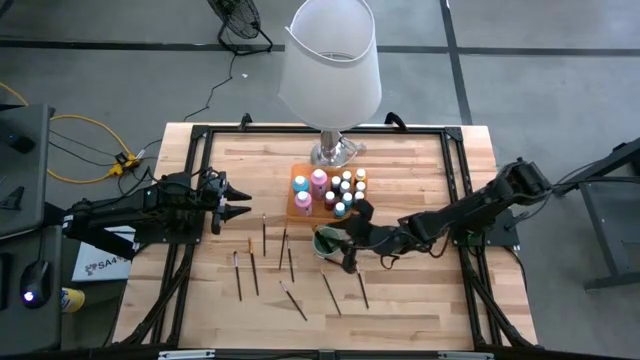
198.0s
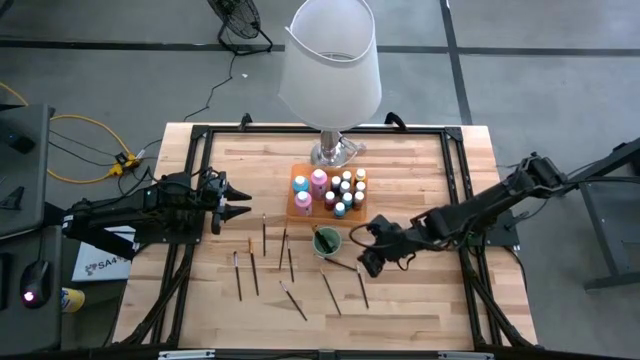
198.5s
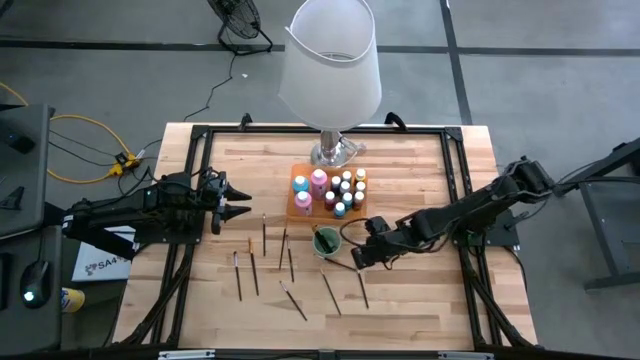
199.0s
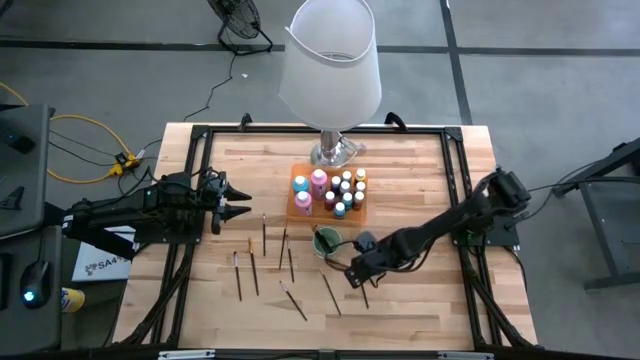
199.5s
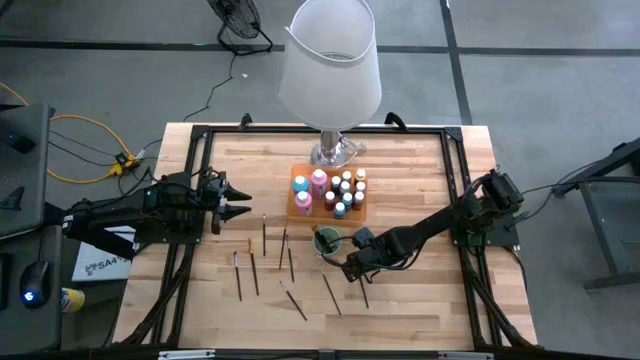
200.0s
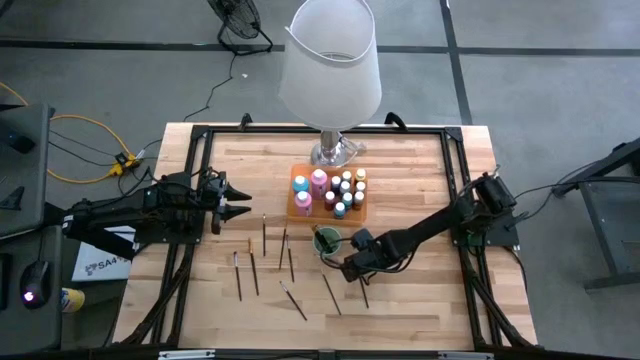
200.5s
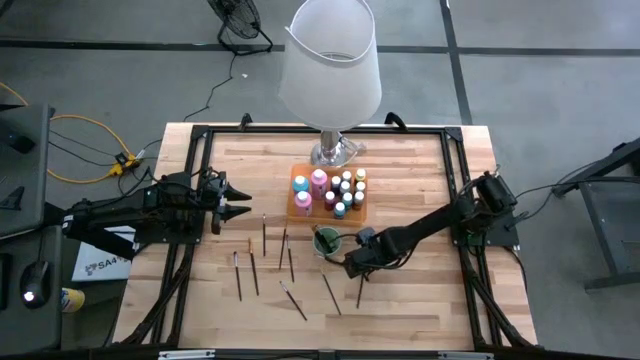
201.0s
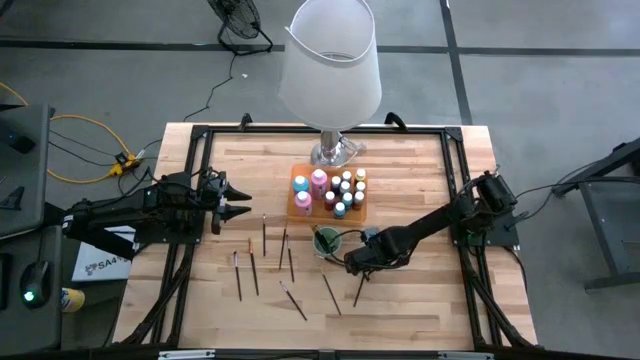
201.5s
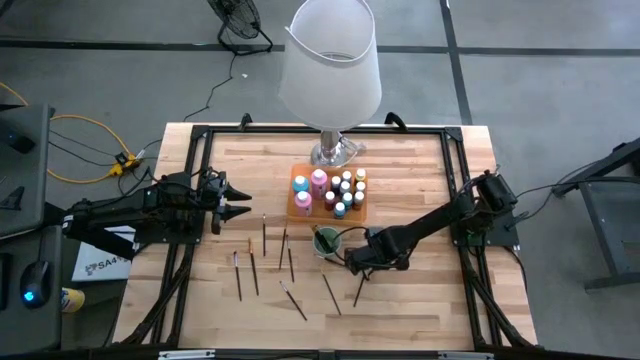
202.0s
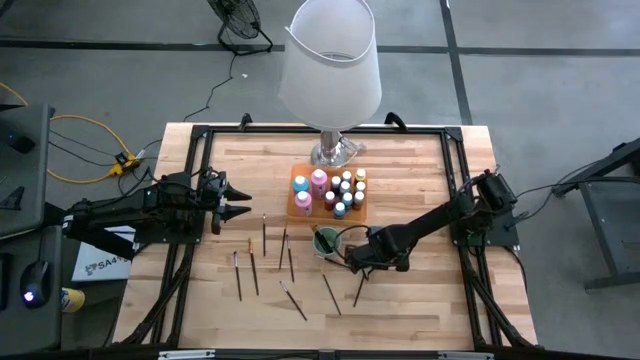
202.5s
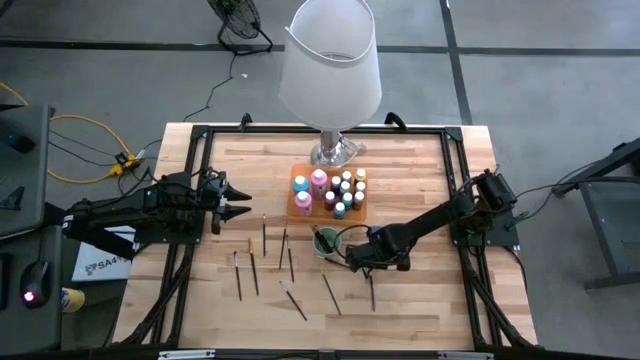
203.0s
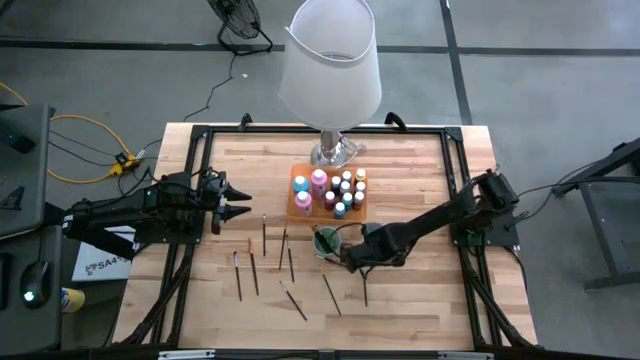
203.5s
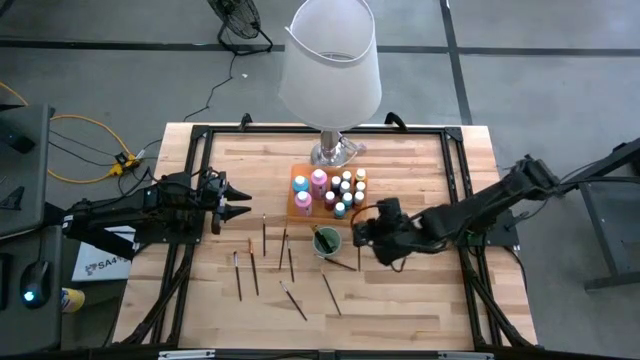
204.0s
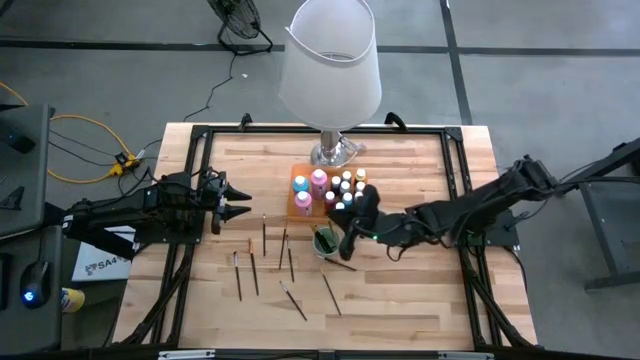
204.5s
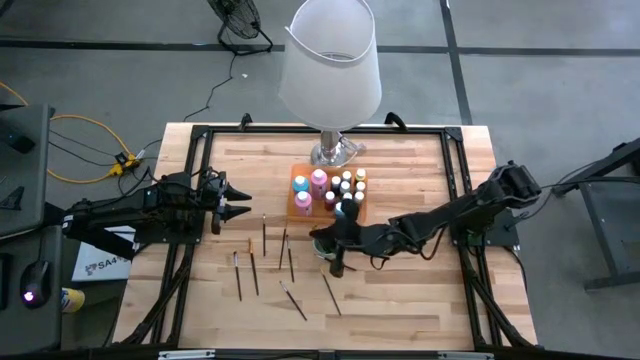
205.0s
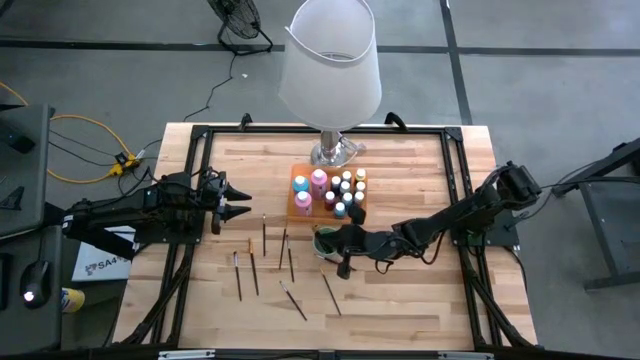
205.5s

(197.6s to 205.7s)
Task: Pick & Place Paint Supplies
Put the gray paintbrushes into the green cup

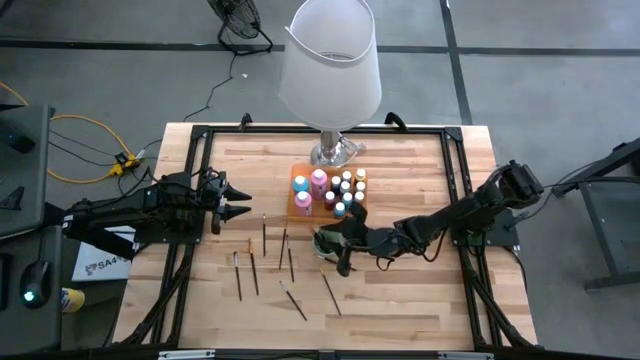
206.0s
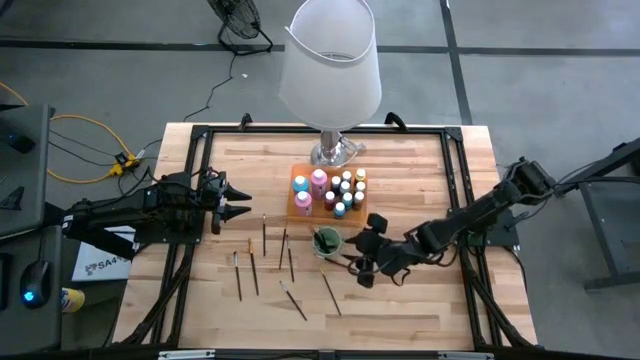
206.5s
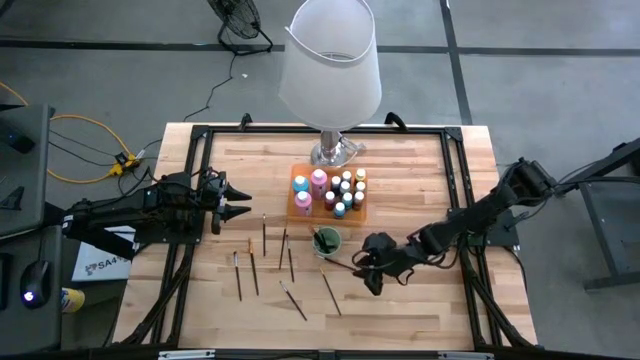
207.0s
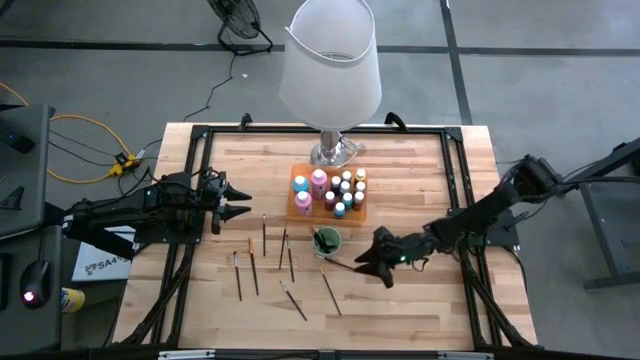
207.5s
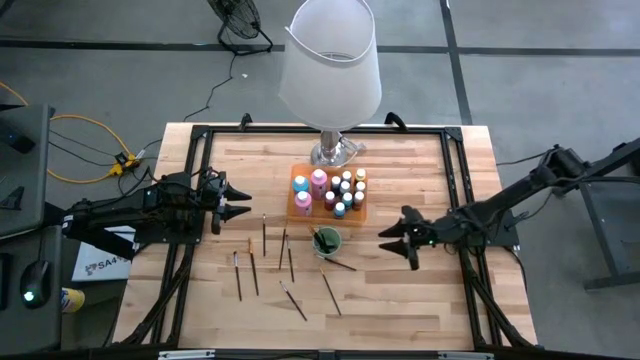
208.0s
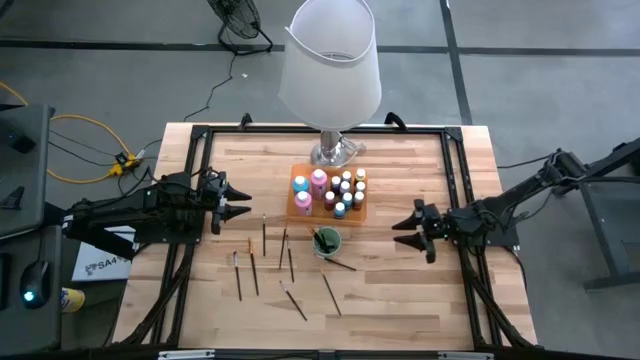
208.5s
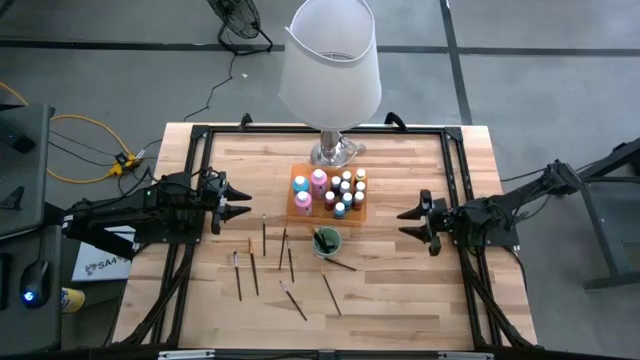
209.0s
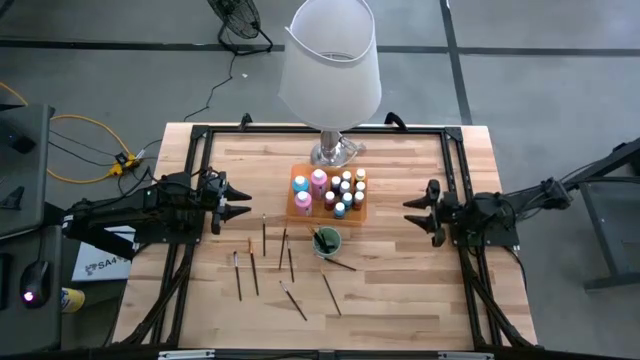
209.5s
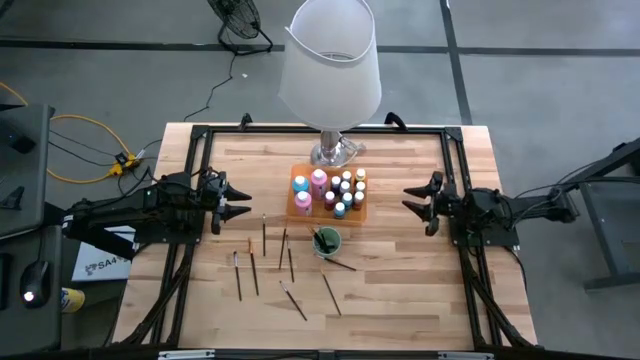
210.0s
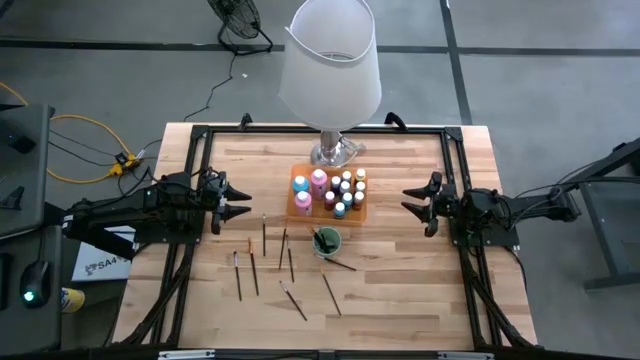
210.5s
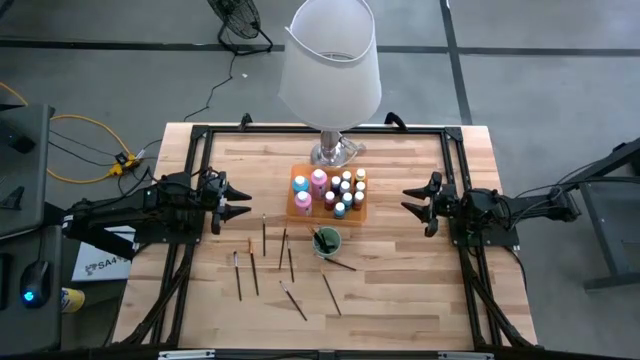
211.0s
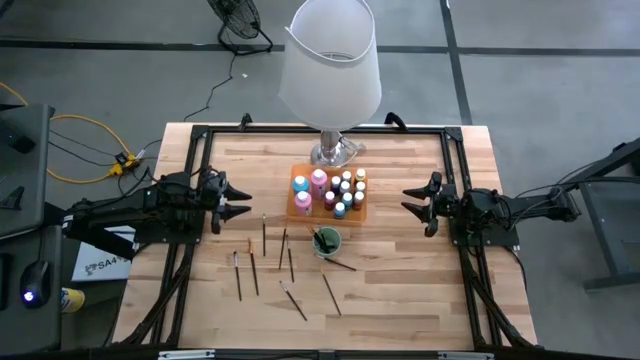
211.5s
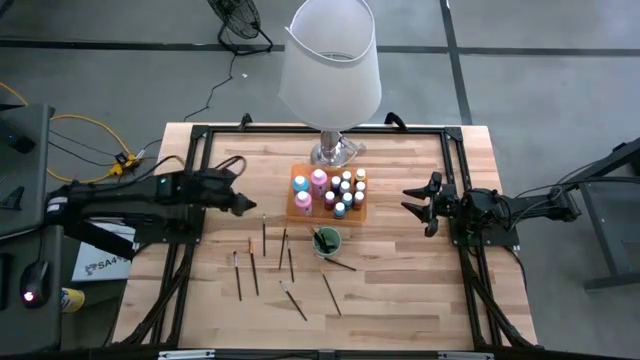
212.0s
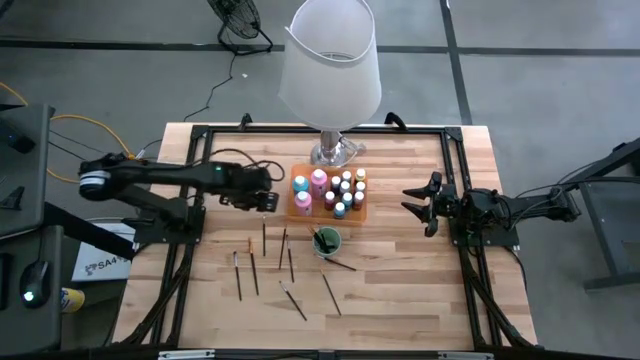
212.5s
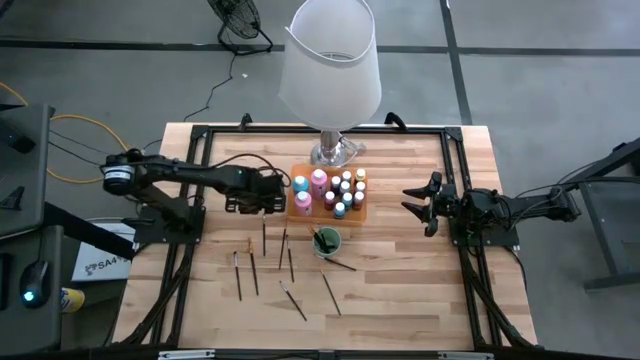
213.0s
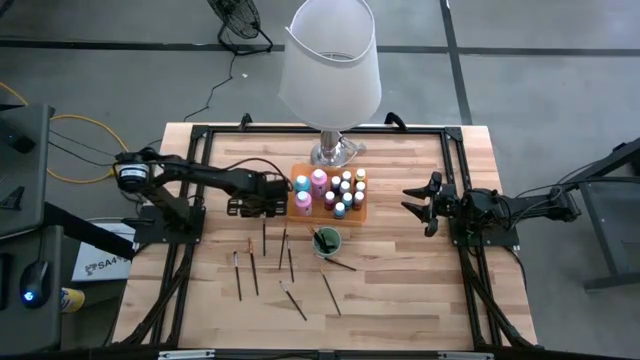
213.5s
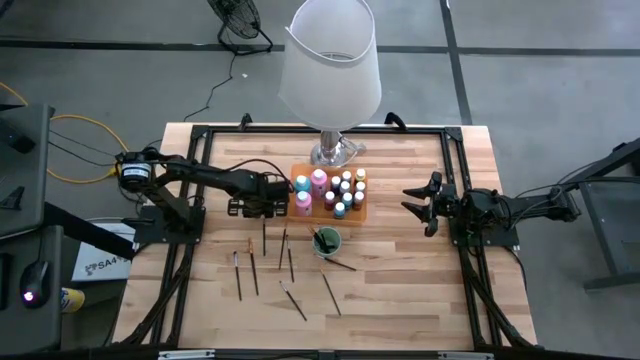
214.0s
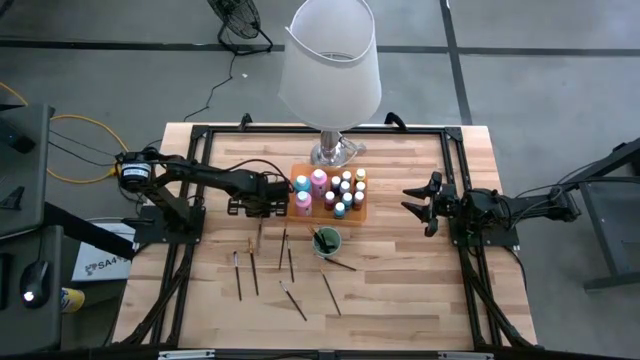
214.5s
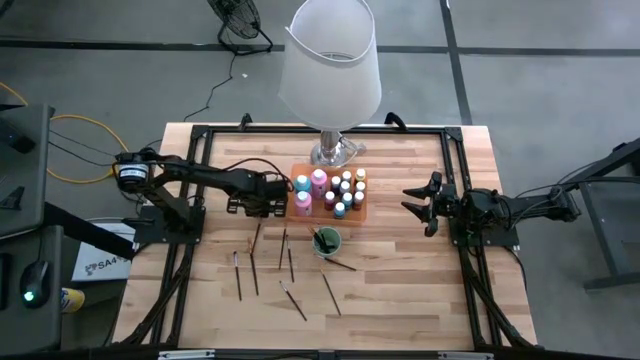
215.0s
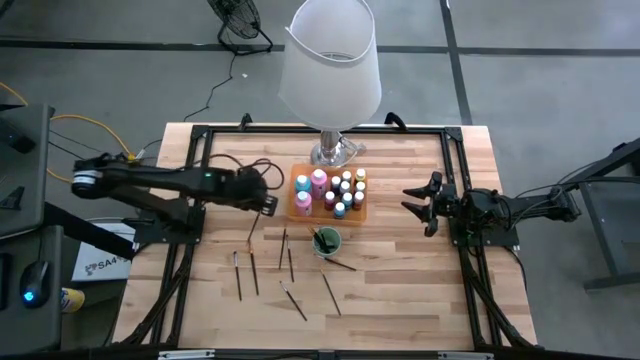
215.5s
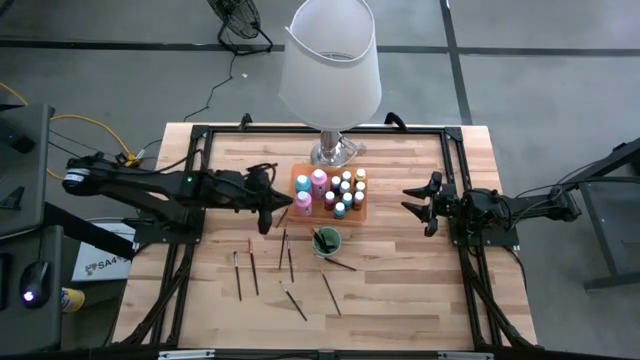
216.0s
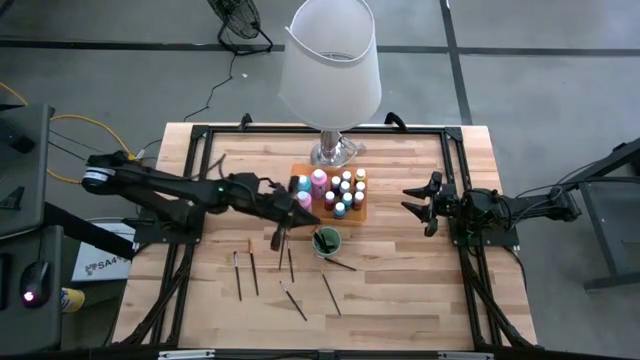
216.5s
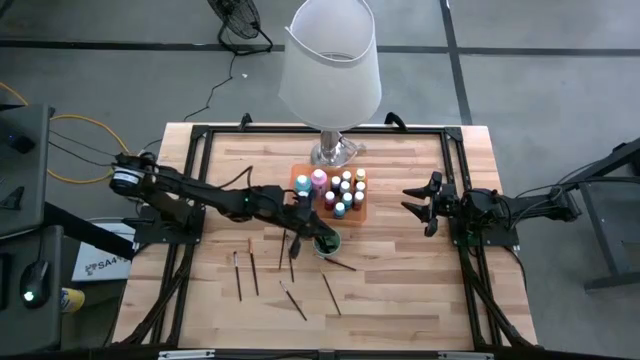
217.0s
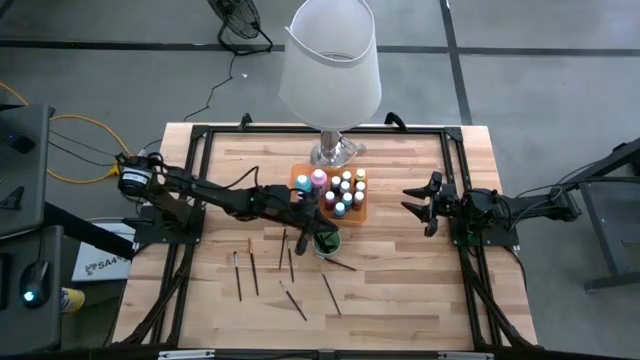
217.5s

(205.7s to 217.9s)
Put the gray paintbrushes into the green cup

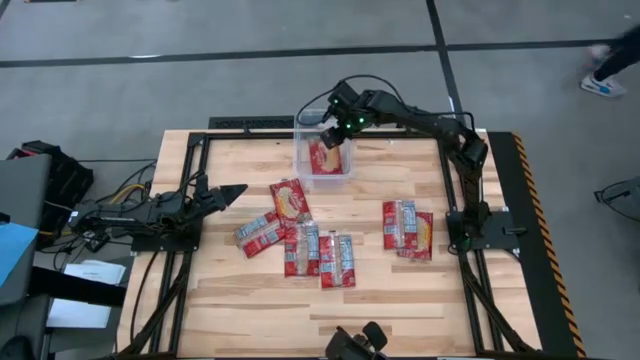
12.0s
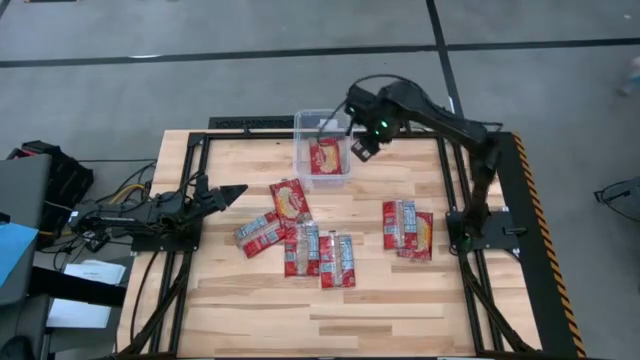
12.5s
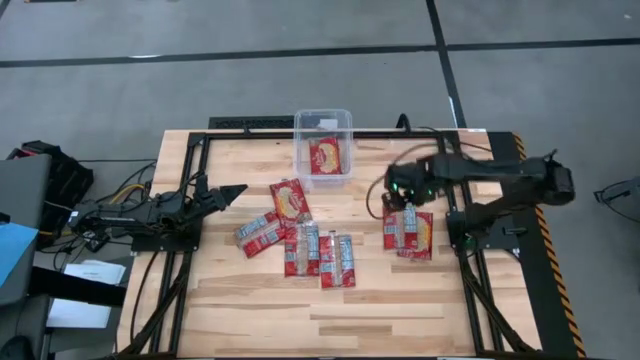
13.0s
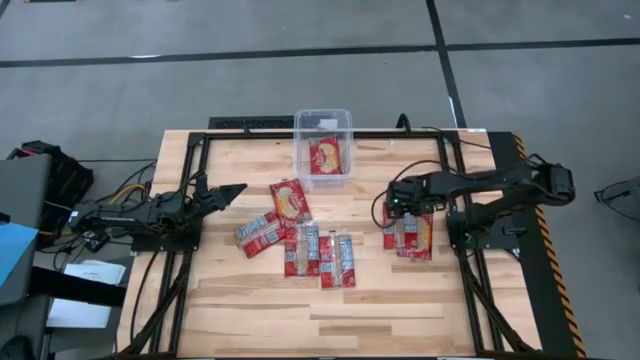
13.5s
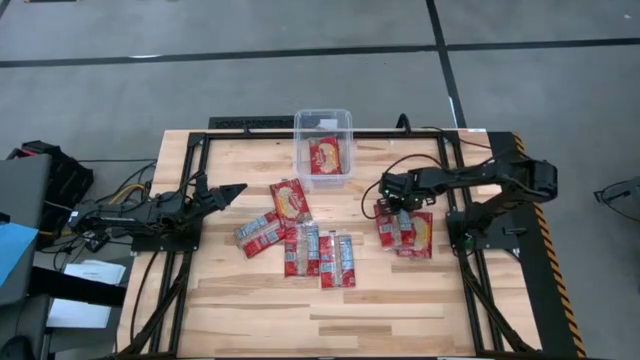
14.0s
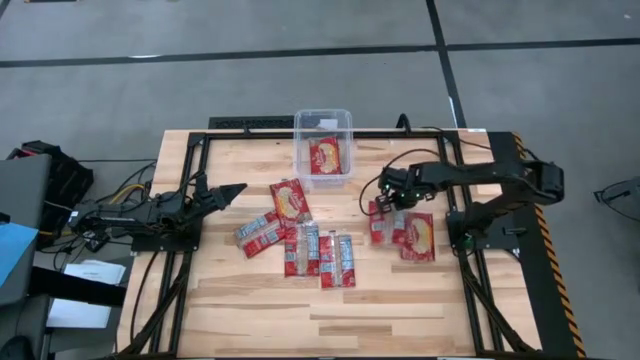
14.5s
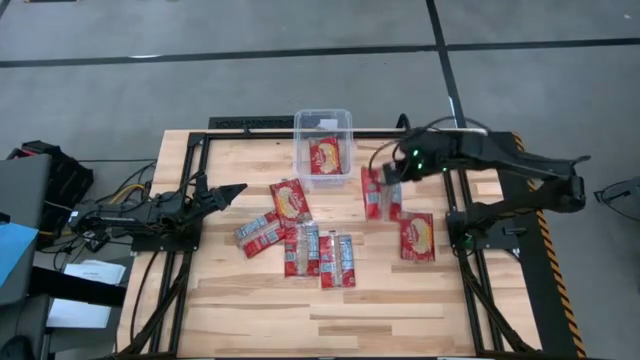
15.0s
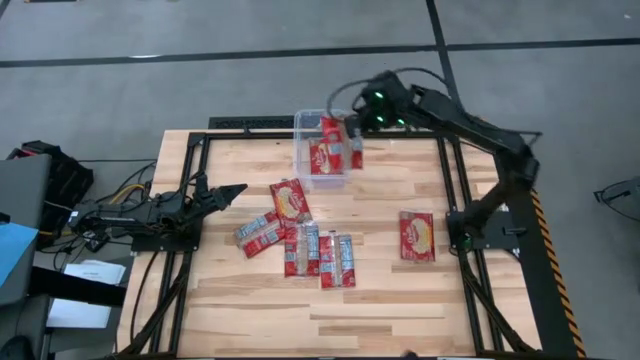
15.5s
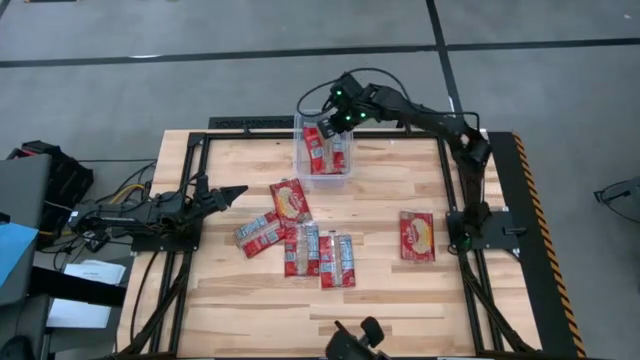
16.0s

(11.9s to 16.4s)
Task: Sort popcorn bags into baskets
Put the red popcorn bag into the transparent bin
